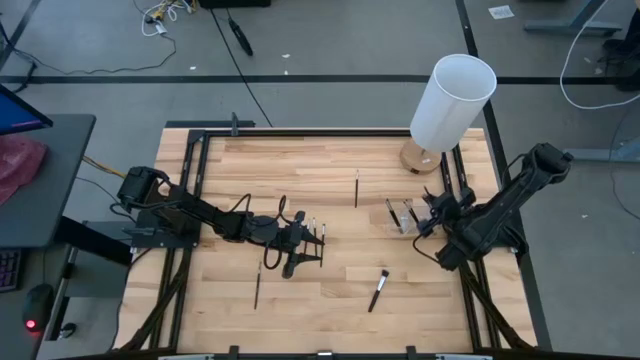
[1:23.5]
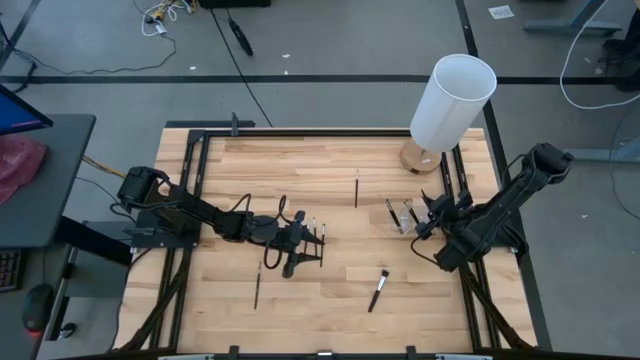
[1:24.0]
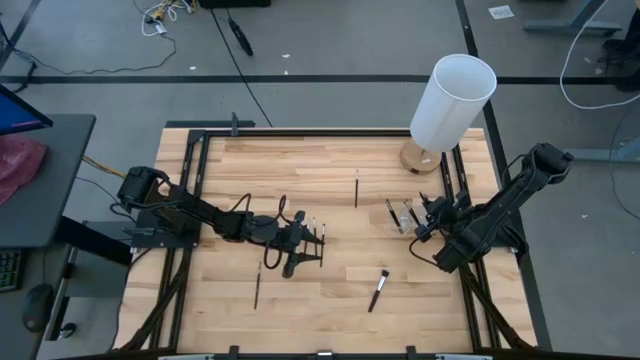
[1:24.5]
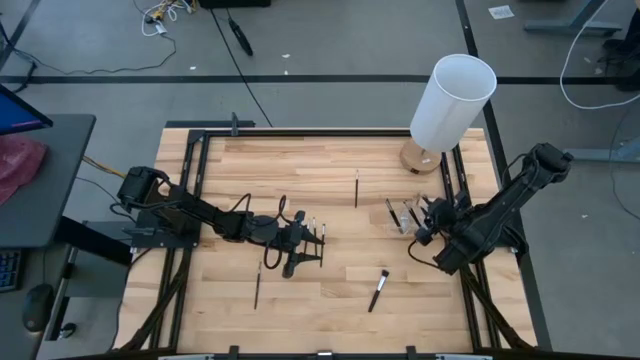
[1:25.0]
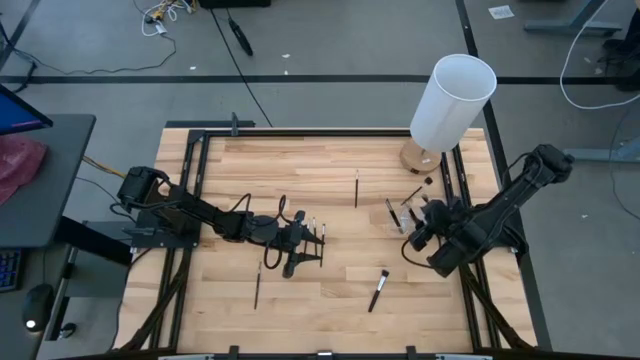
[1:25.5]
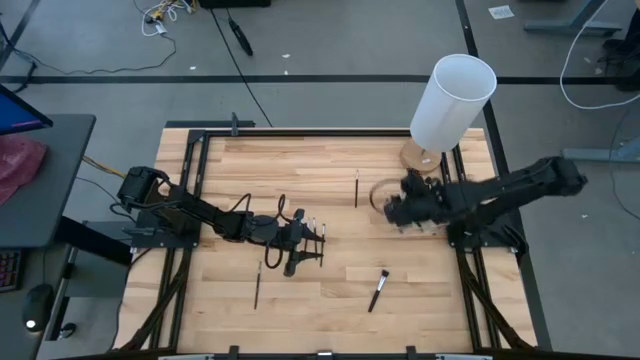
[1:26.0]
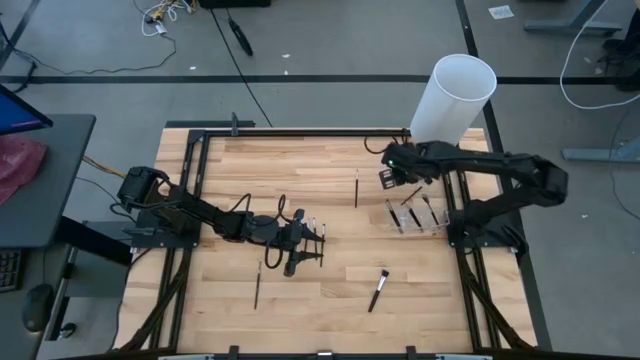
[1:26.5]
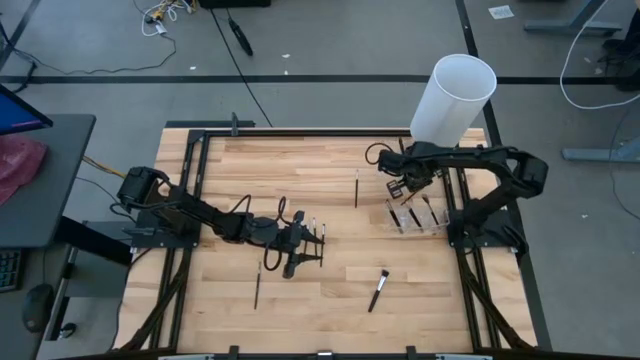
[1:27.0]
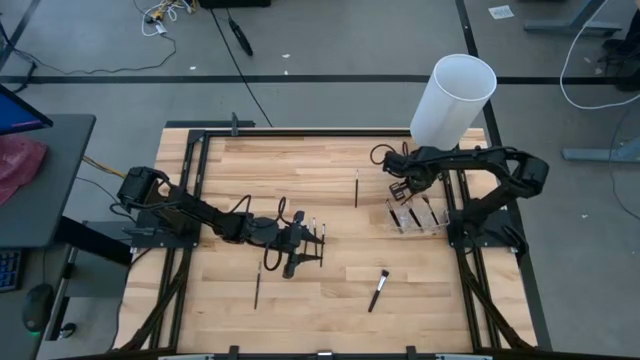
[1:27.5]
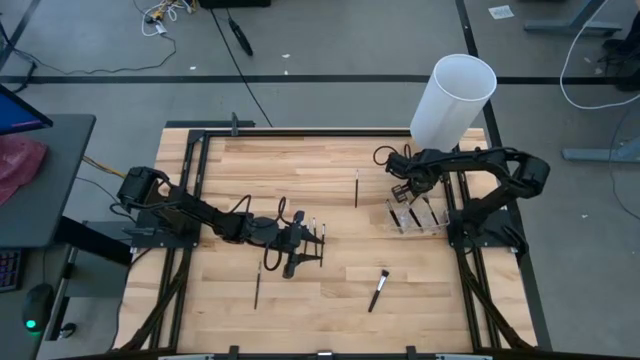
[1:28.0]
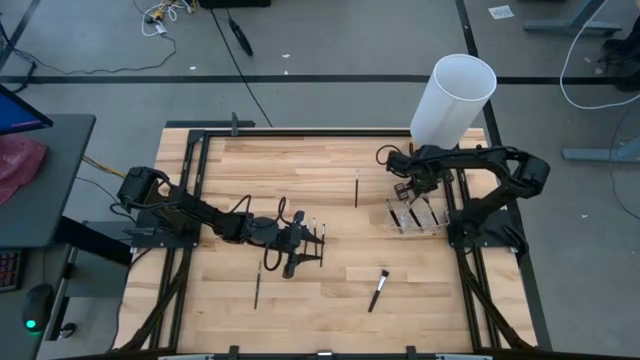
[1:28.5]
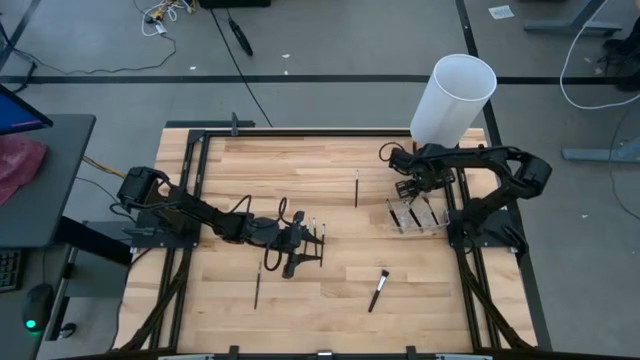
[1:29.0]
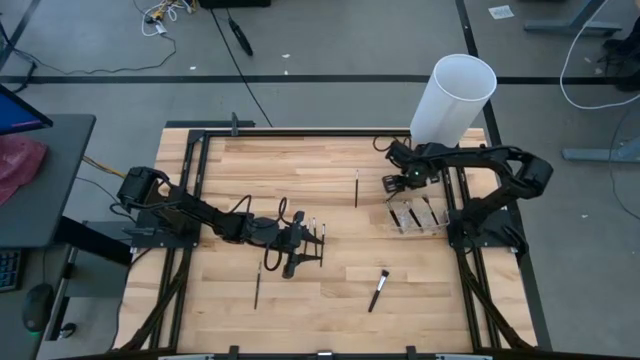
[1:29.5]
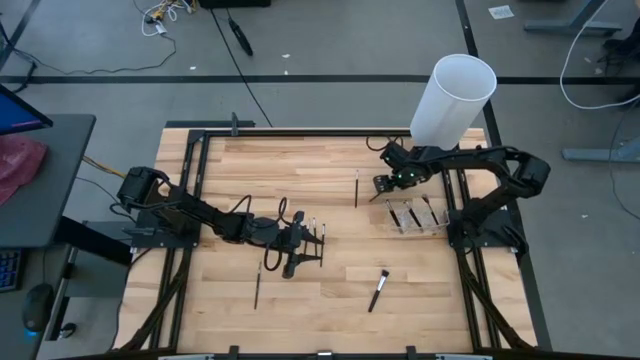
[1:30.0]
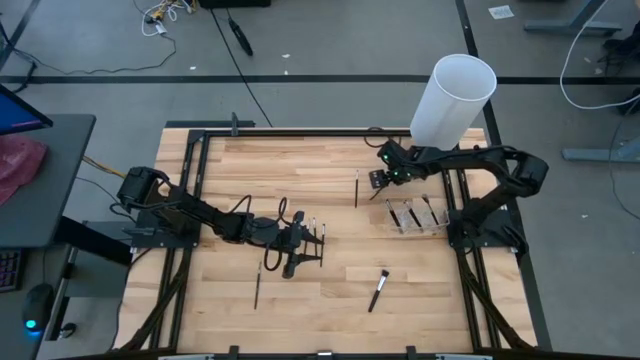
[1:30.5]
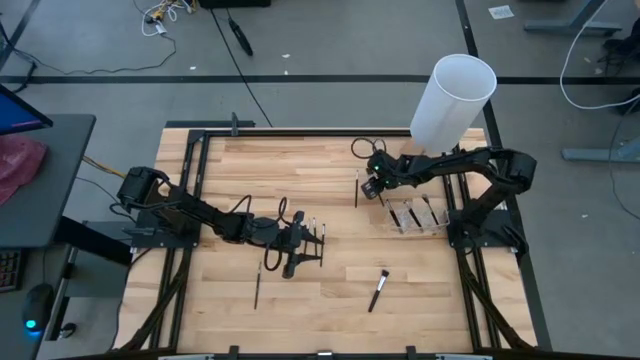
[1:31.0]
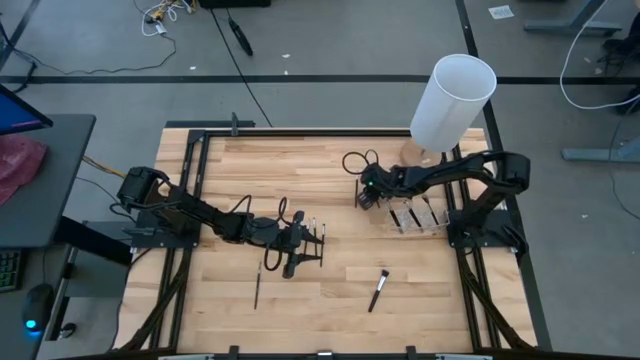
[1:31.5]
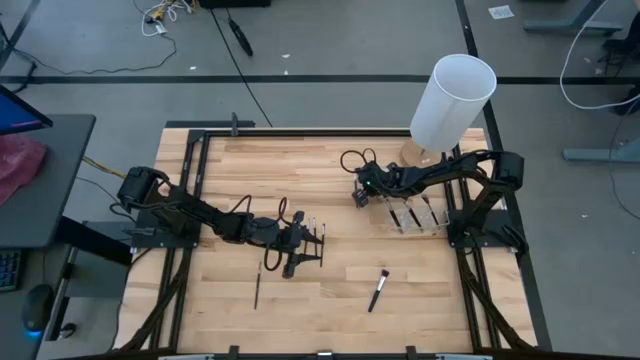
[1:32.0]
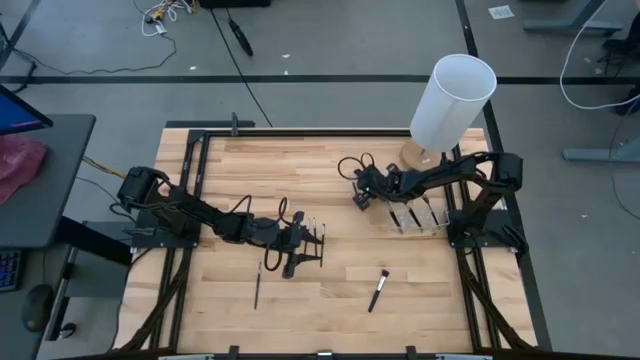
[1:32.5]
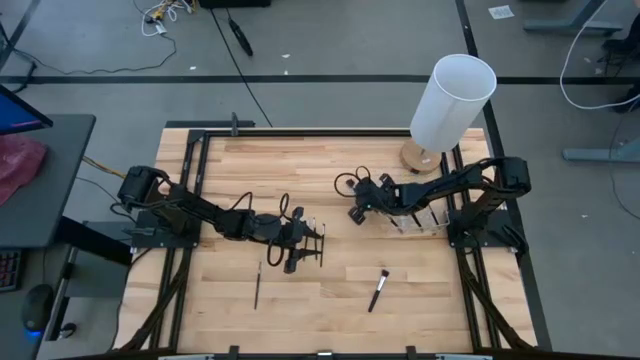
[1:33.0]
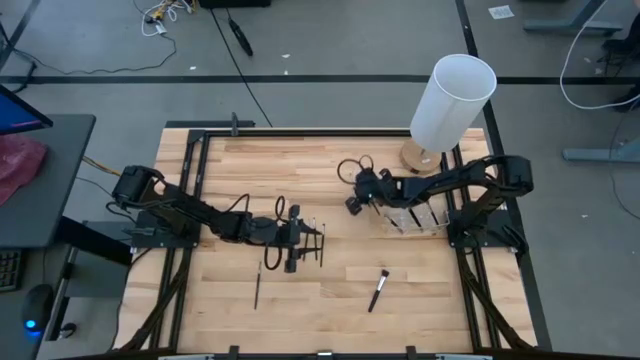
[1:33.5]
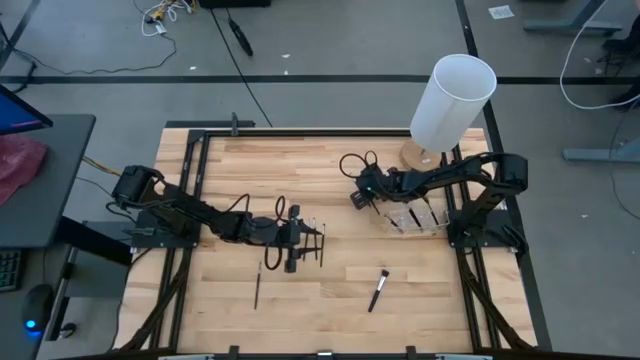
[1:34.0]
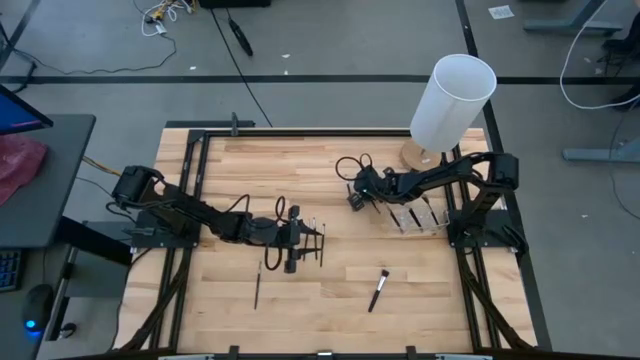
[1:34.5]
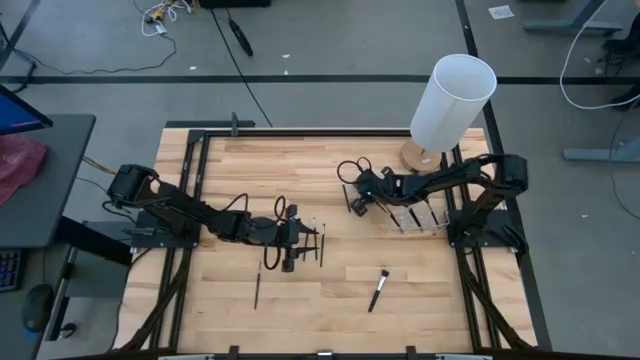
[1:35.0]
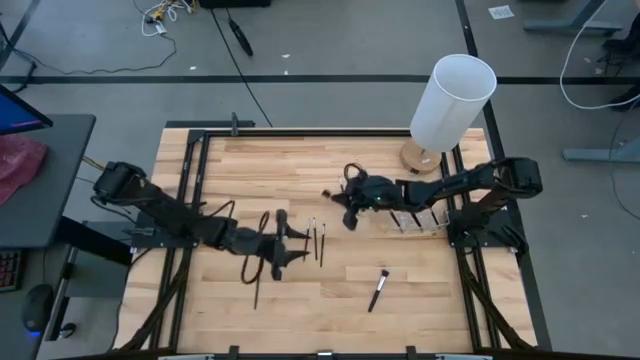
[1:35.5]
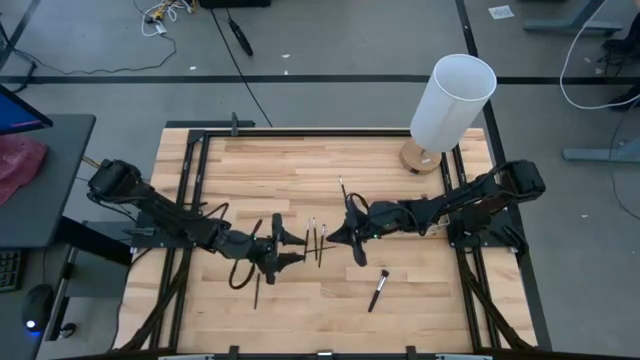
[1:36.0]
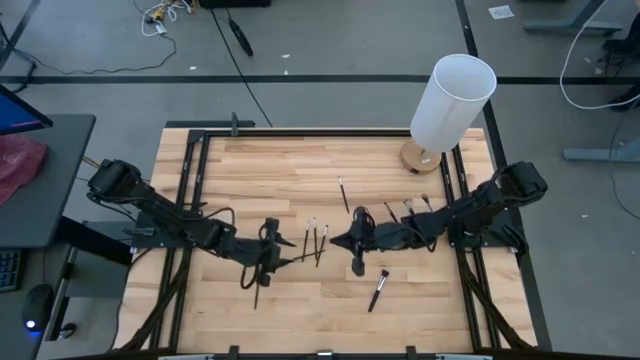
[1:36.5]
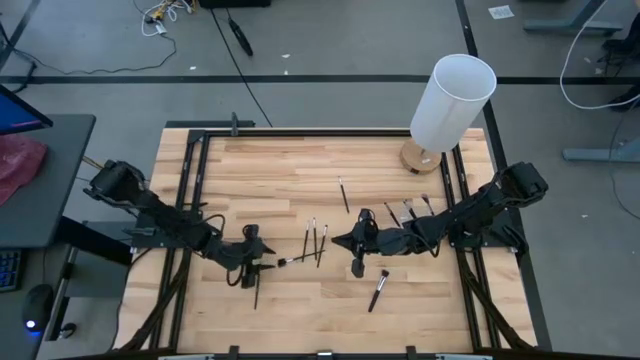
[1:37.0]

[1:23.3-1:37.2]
Task: Put items in baskets/containers
Put the black brow brush into the transparent bin

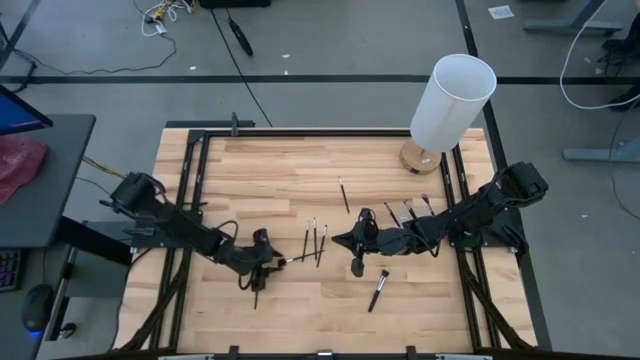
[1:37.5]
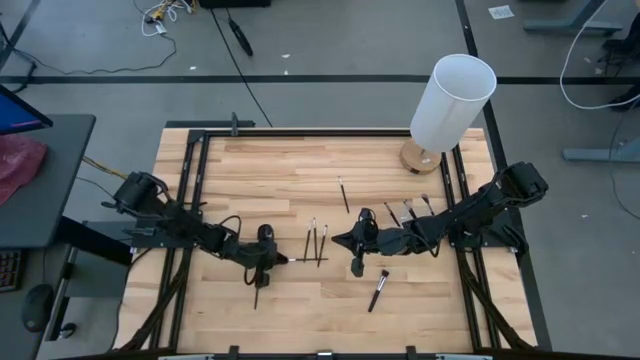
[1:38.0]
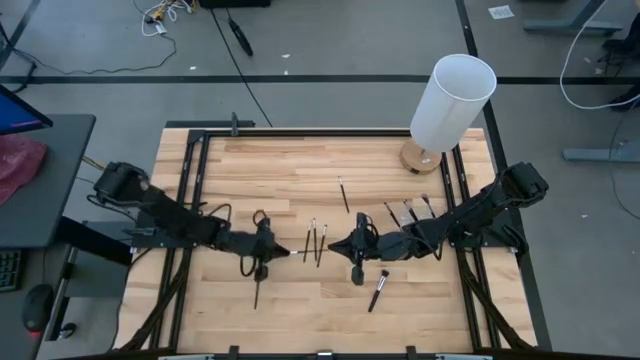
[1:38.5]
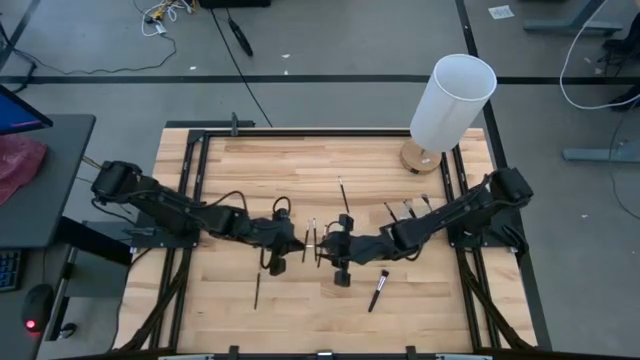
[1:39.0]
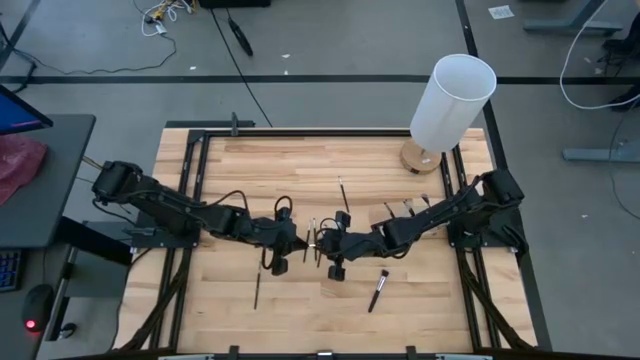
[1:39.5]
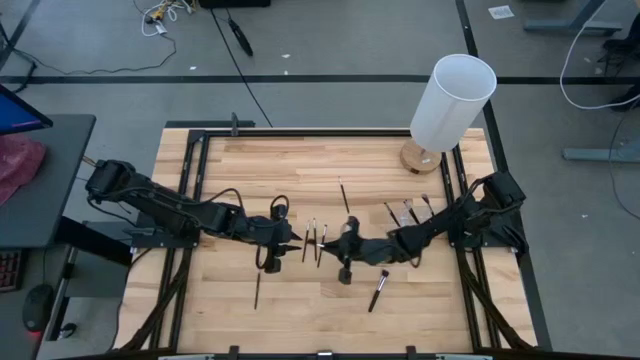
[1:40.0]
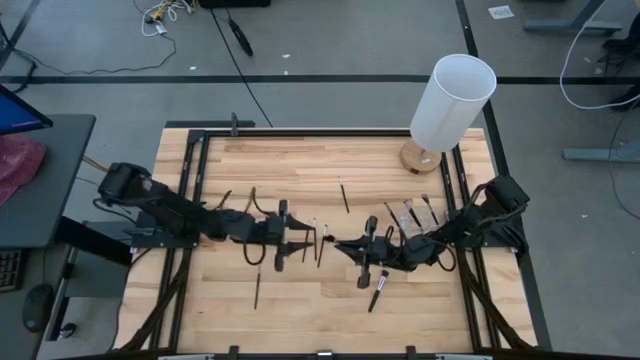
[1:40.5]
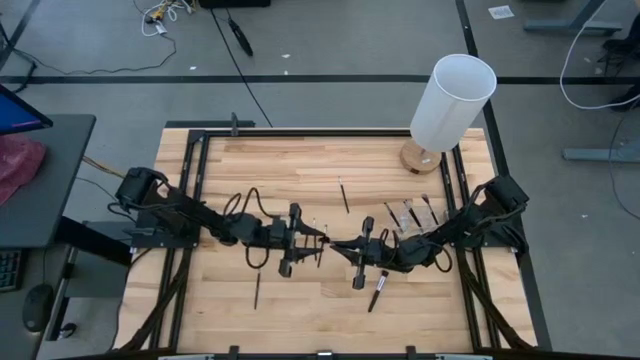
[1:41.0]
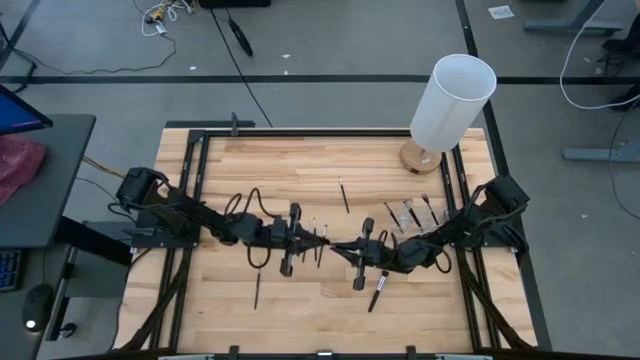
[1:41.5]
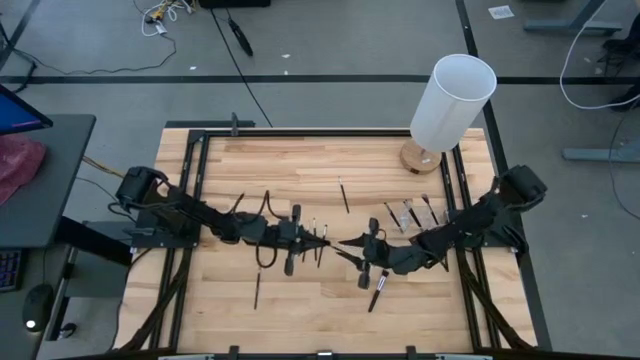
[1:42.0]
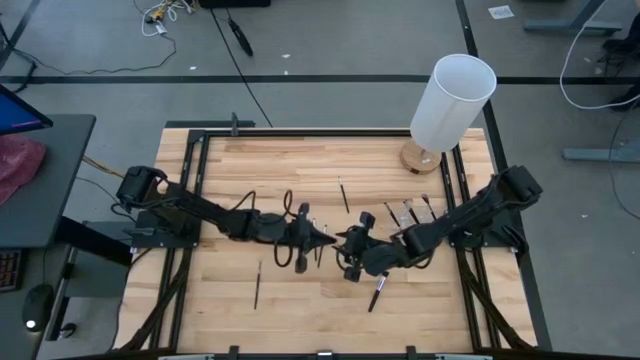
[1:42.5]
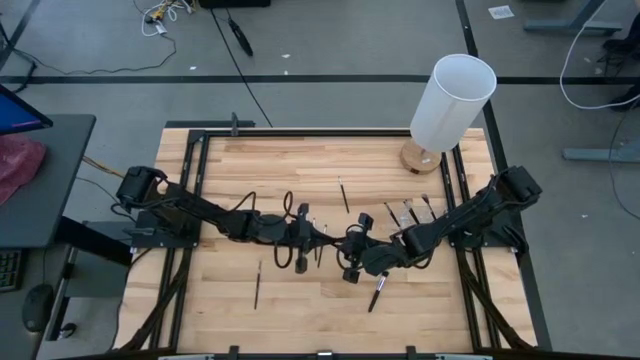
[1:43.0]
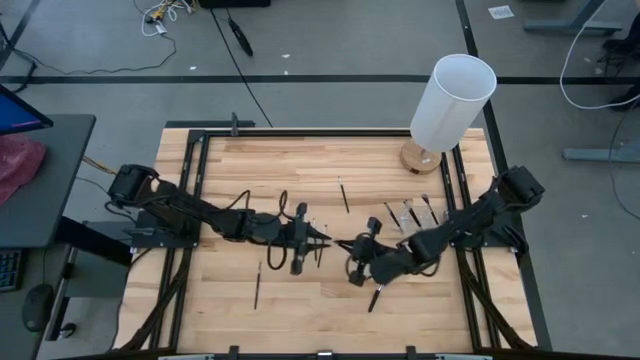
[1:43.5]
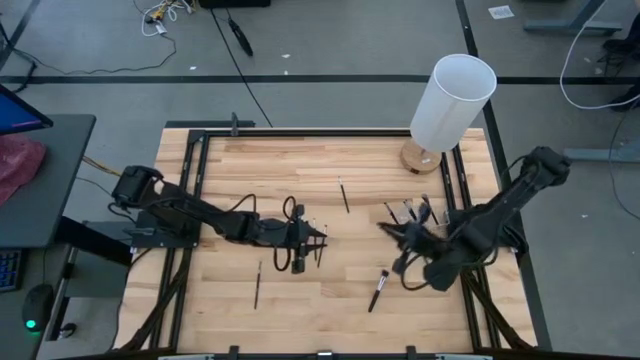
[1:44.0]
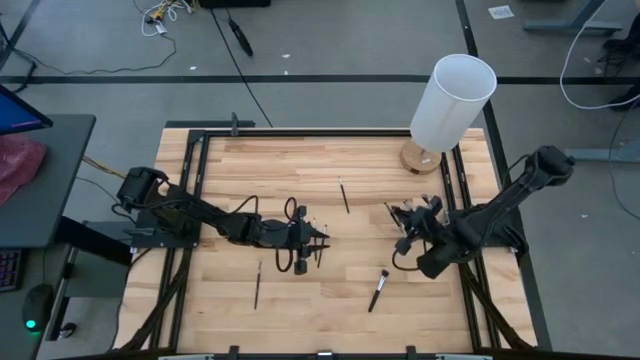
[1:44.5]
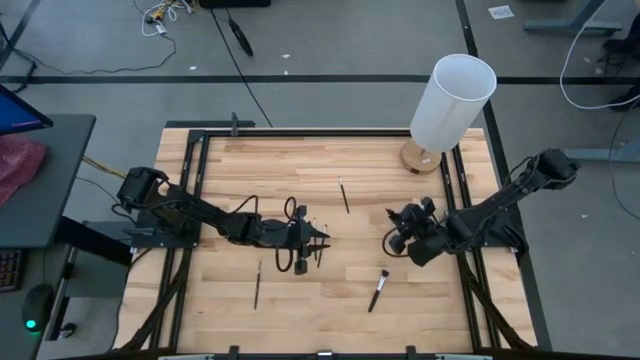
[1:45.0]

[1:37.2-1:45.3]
Put the black brow brush into the transparent bin
